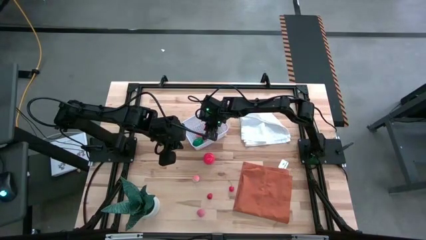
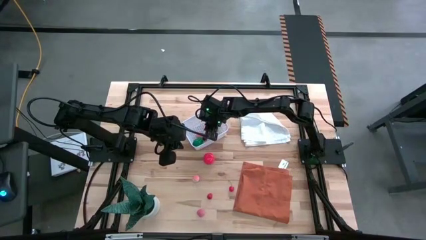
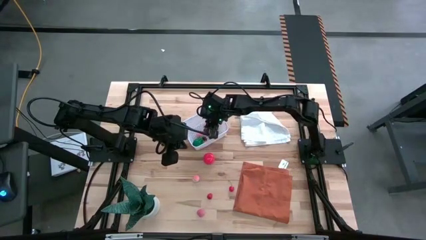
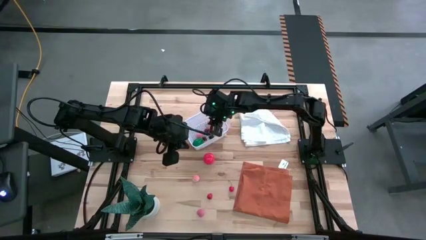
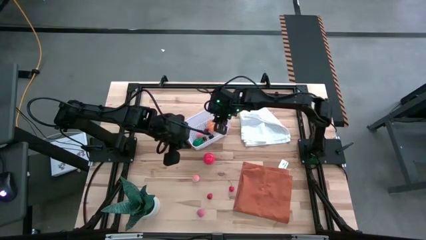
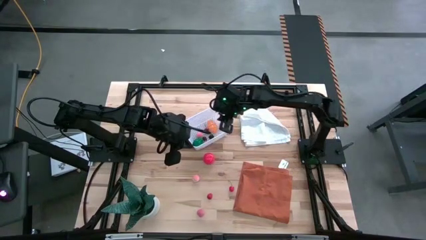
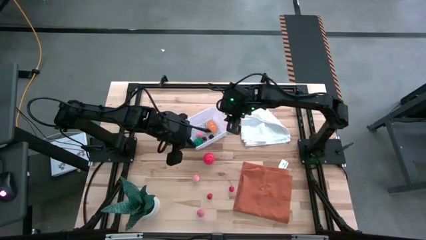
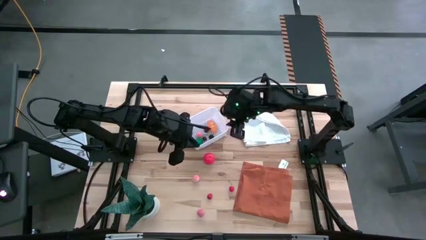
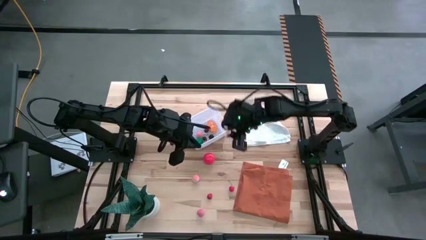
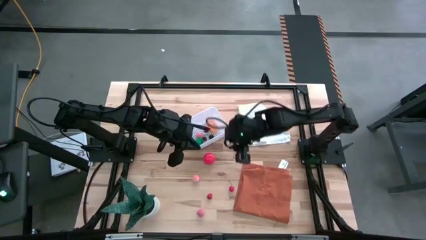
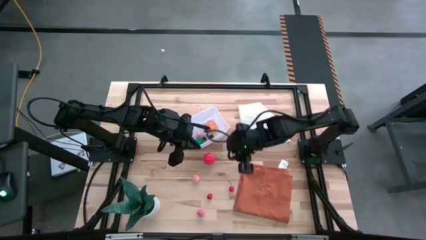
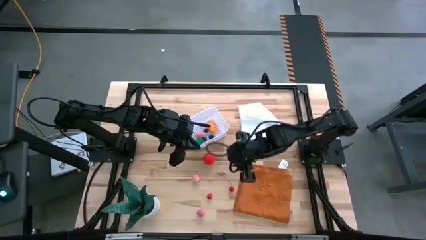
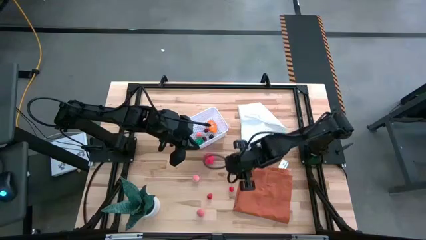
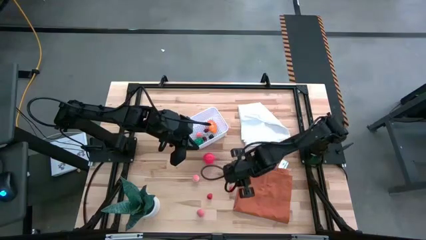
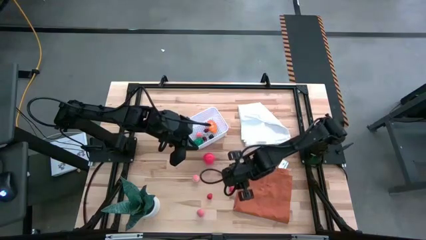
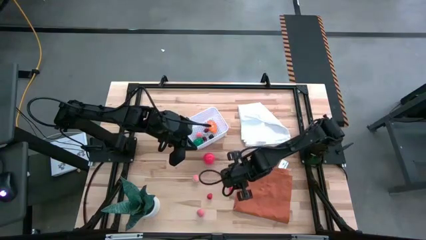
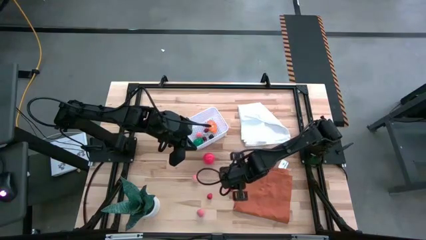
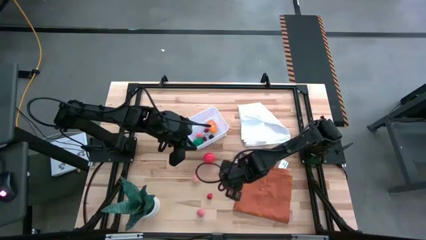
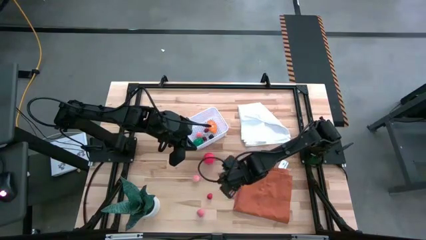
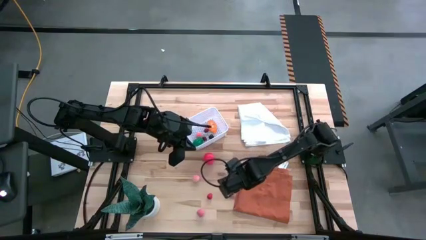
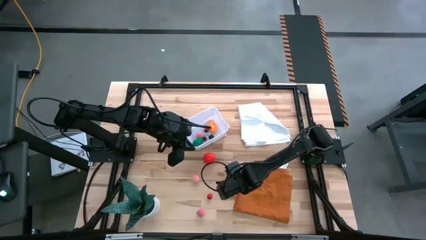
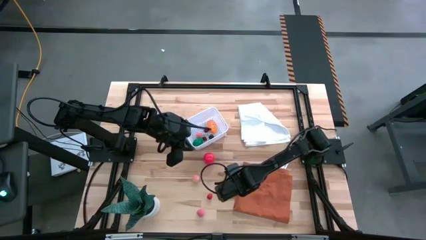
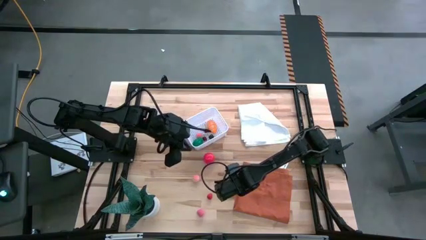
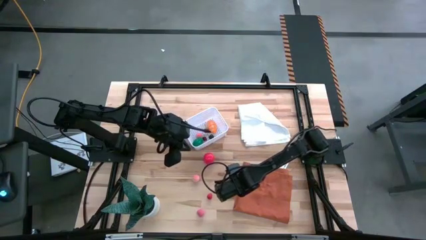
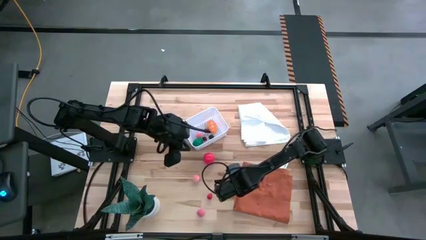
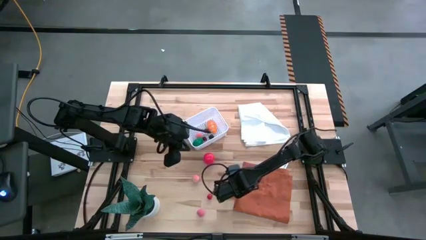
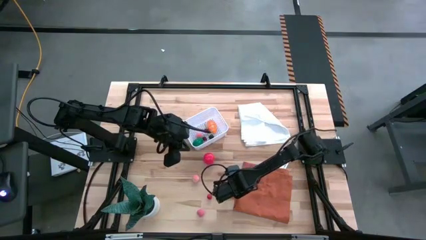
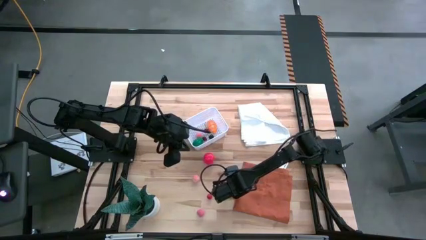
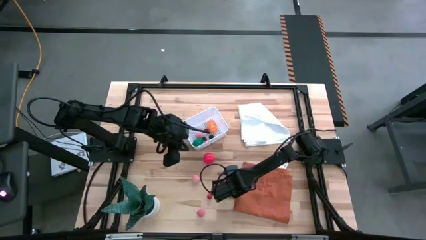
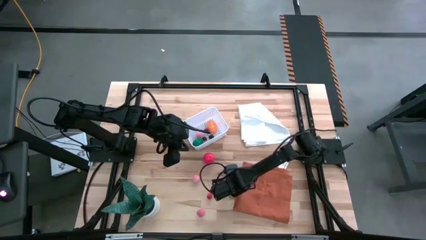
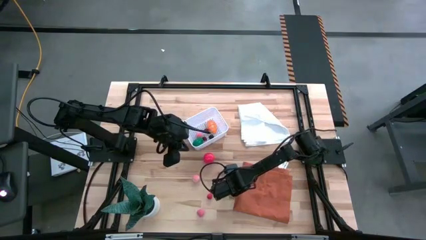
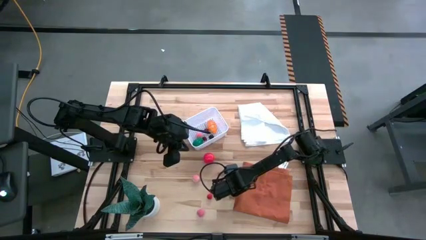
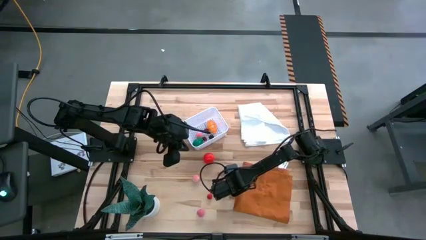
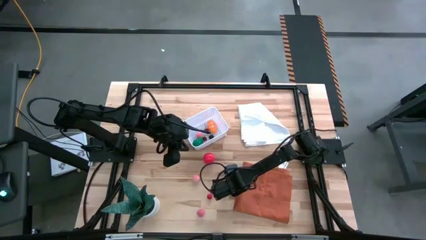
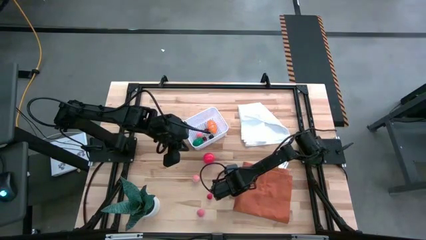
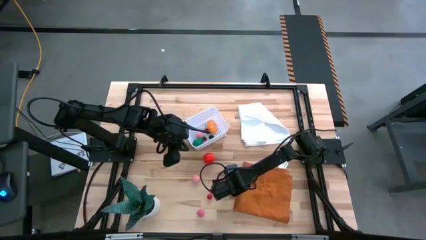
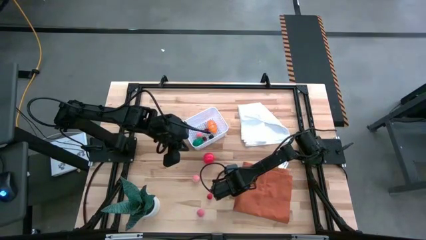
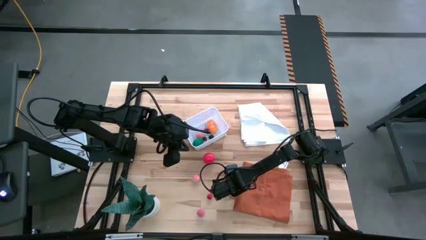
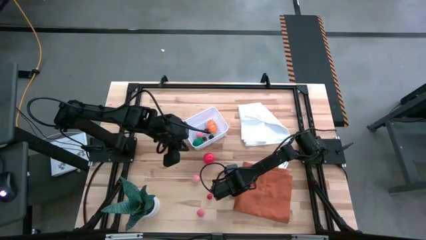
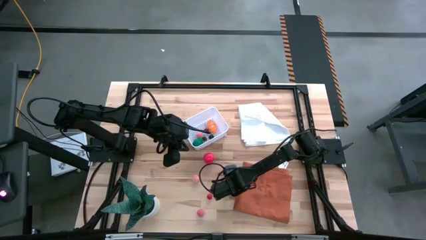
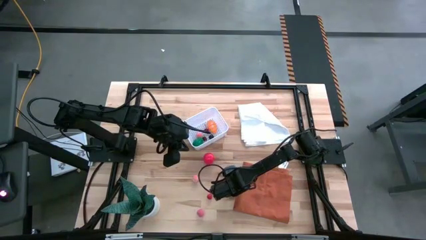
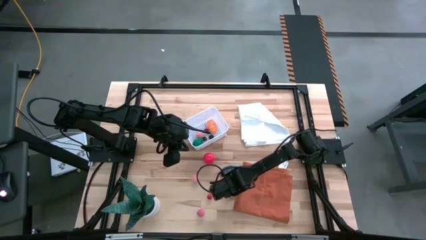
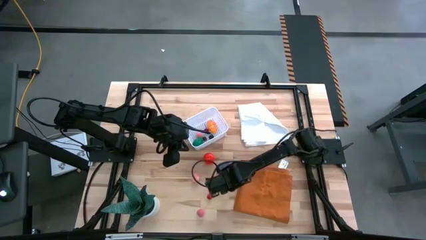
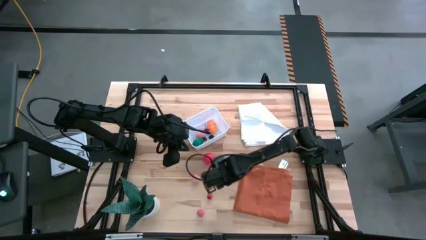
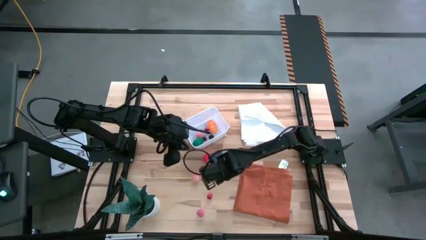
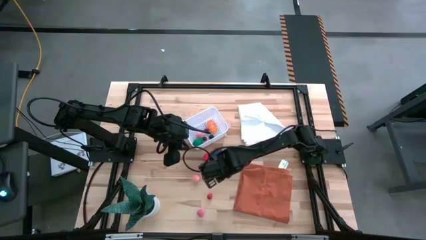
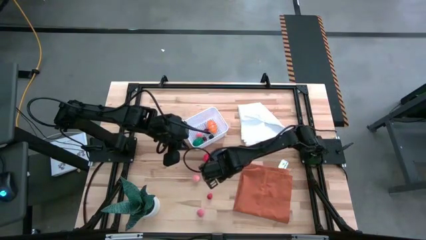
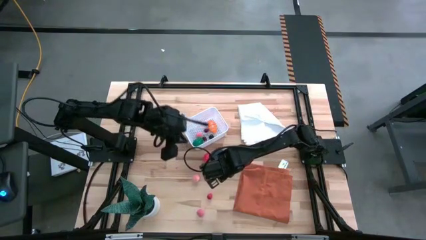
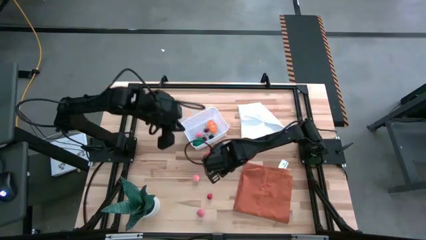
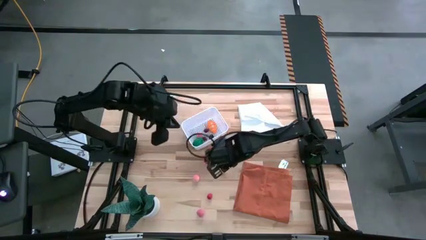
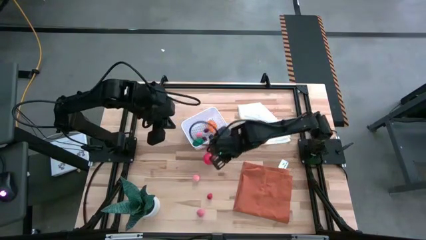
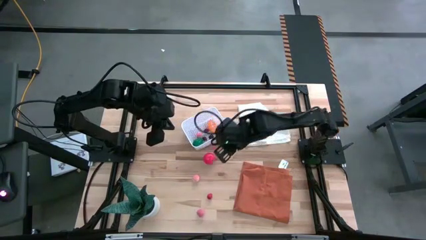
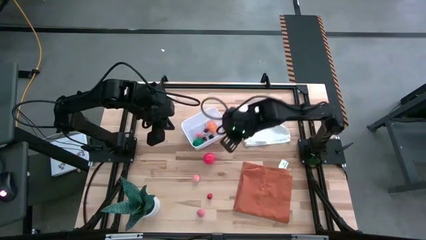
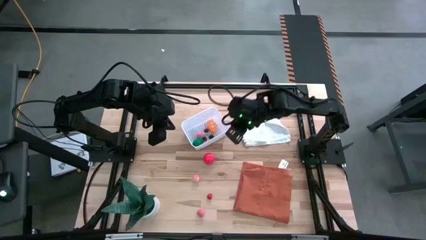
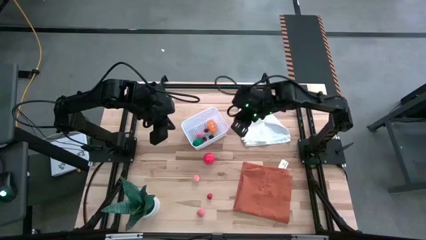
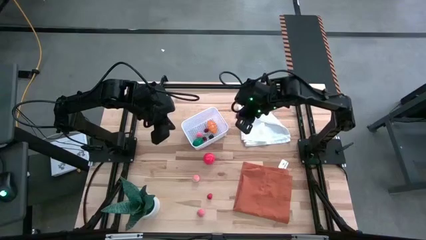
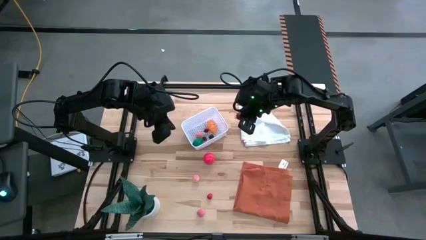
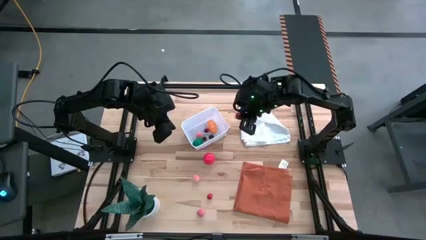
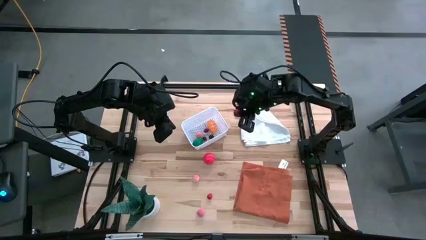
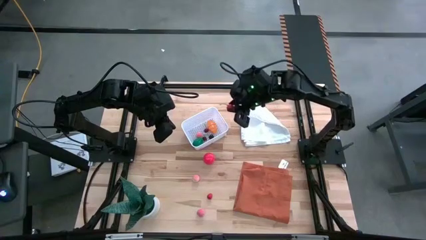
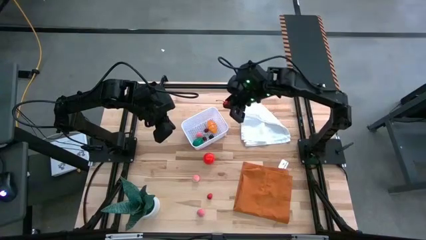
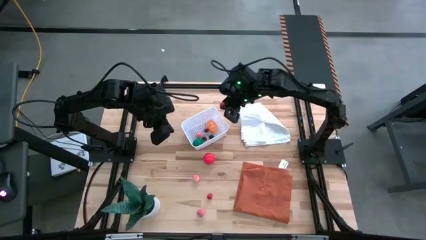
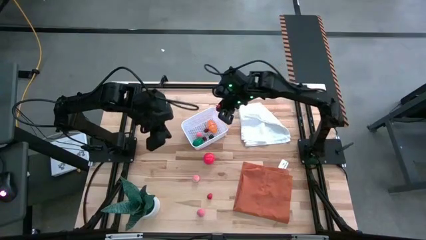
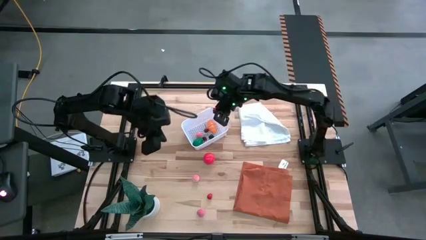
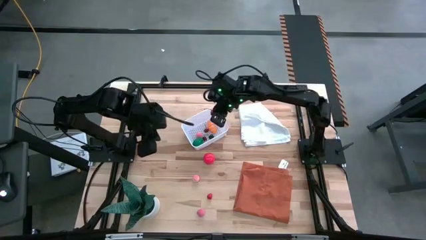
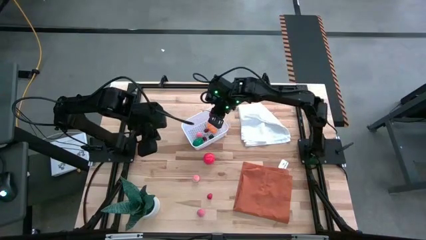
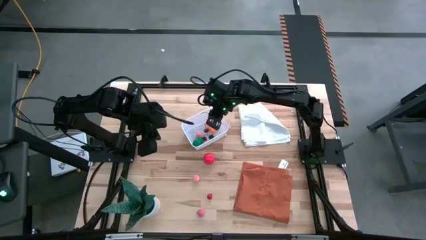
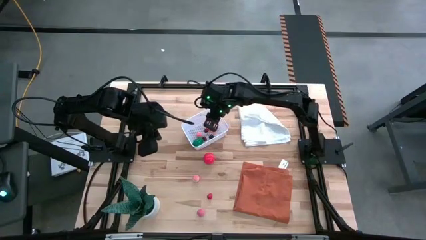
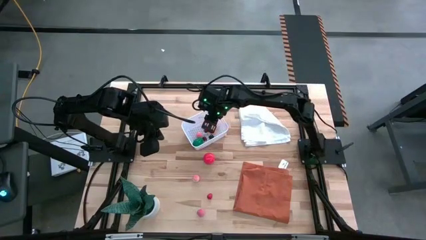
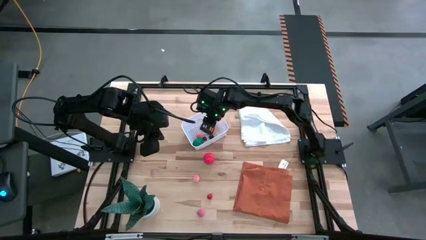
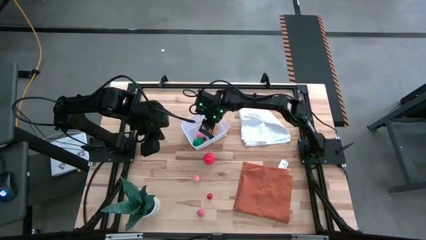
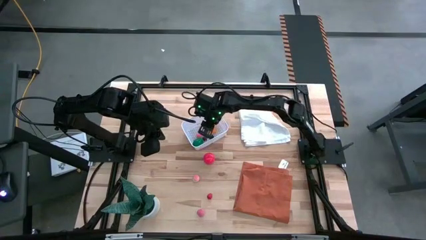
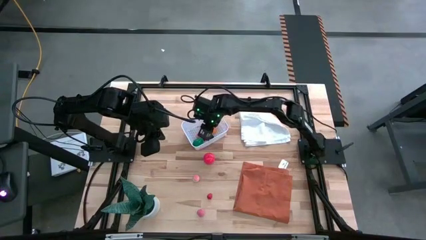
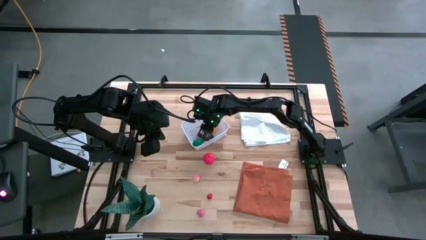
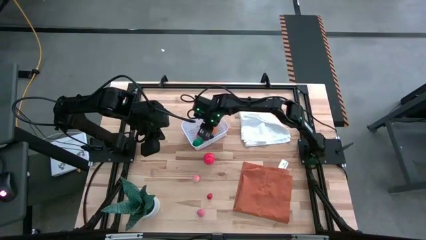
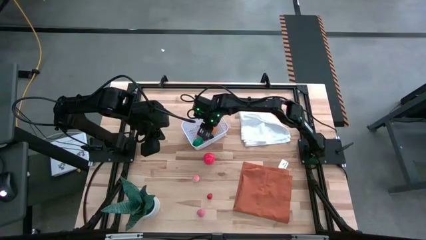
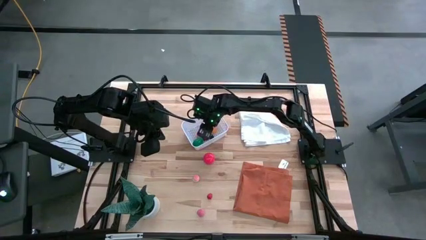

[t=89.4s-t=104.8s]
Task: Pick and placing Produce into tupperware
Put the red cherry in the basket

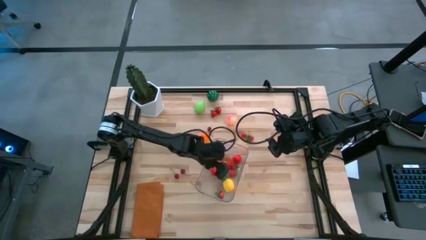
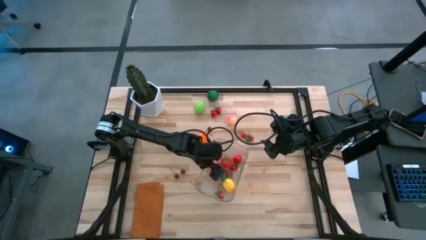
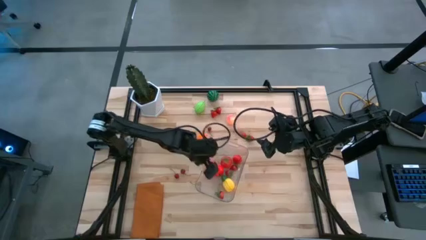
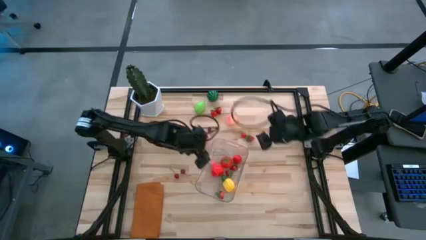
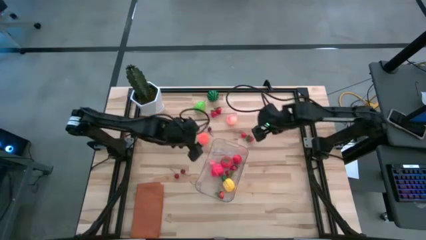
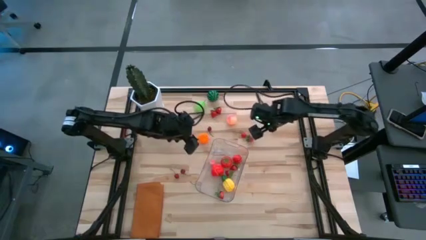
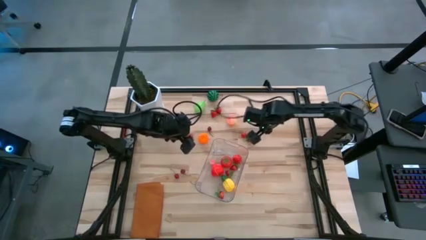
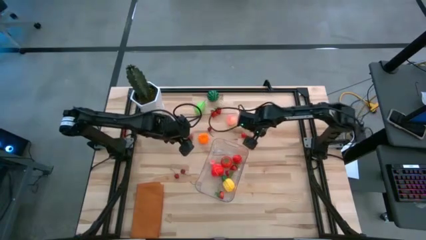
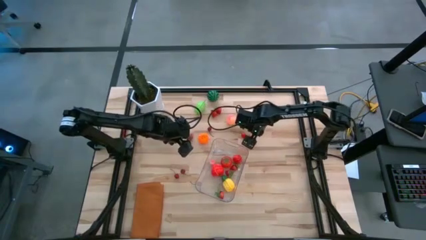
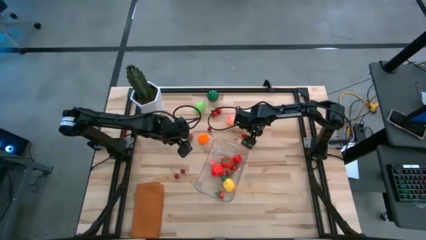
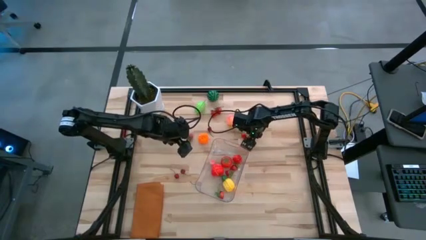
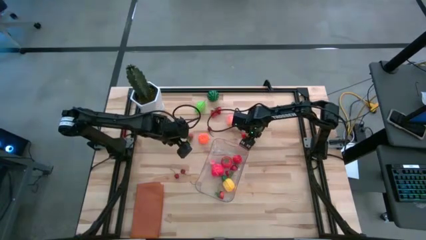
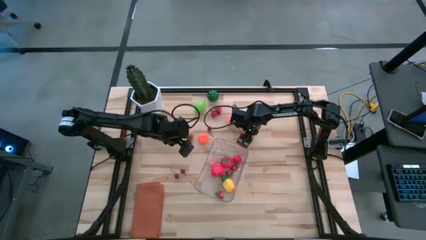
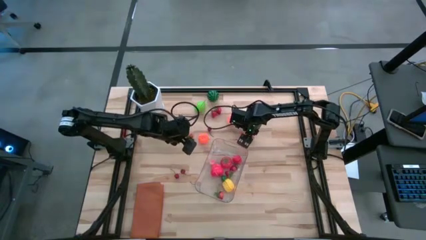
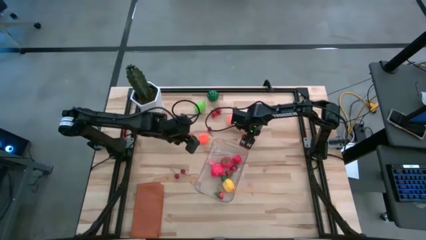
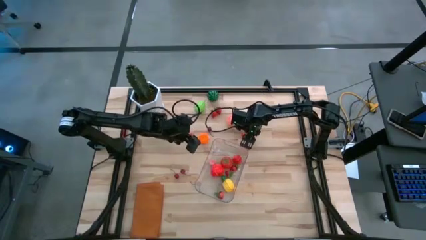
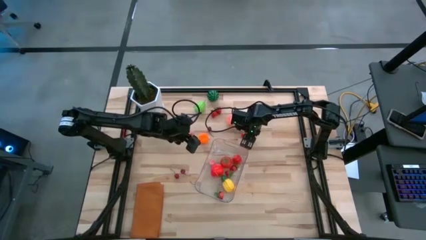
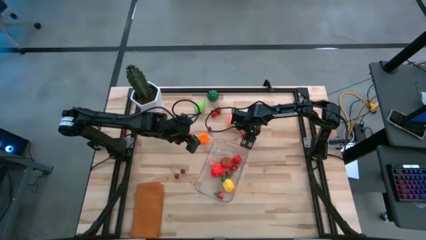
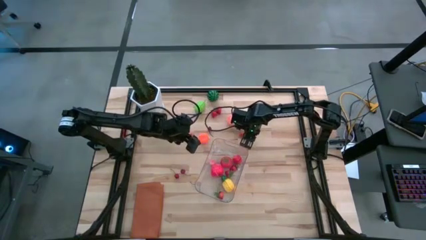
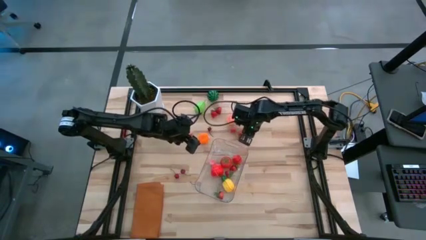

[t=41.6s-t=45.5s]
Task: Pick and placing Produce into tupperware
Put the red strawberry into the transparent bin
